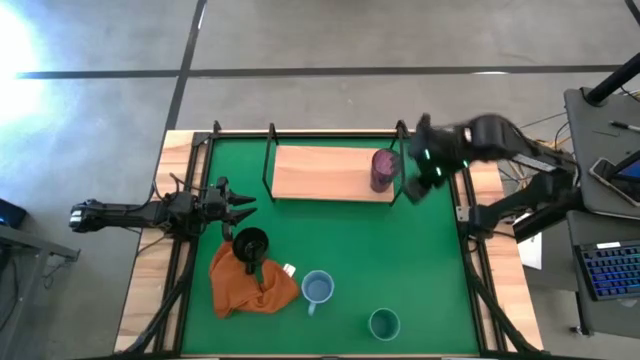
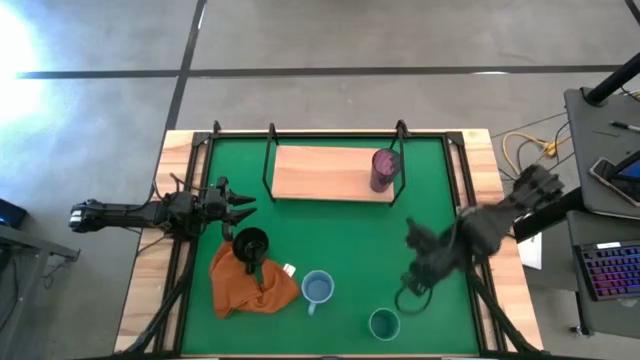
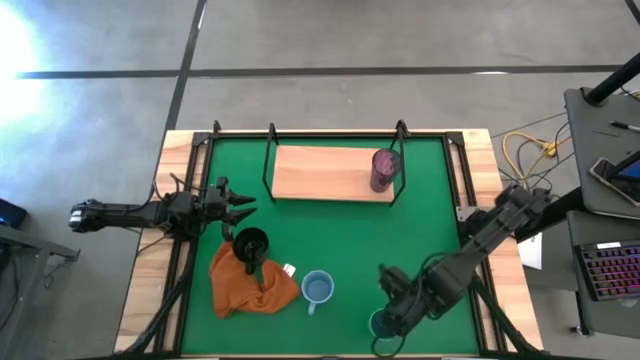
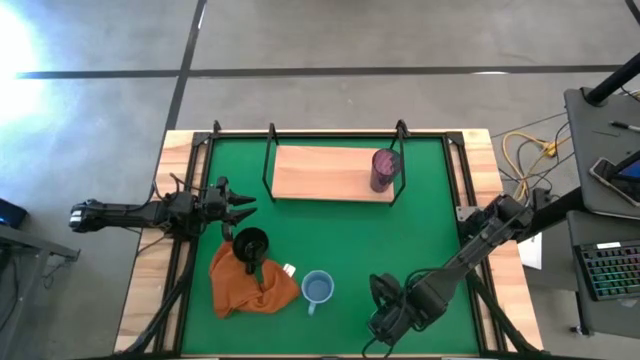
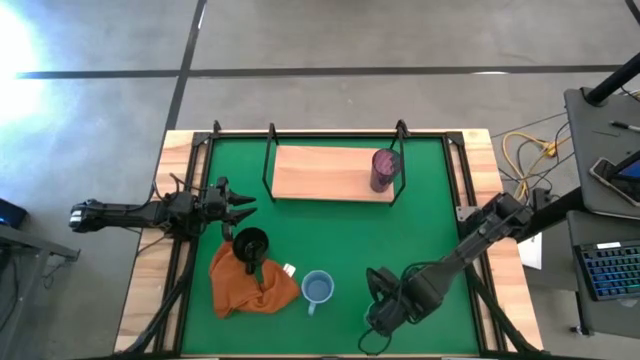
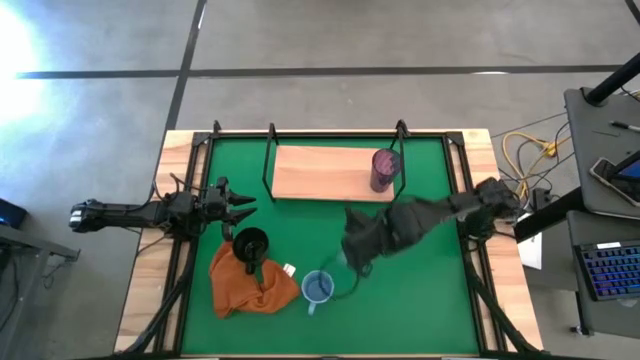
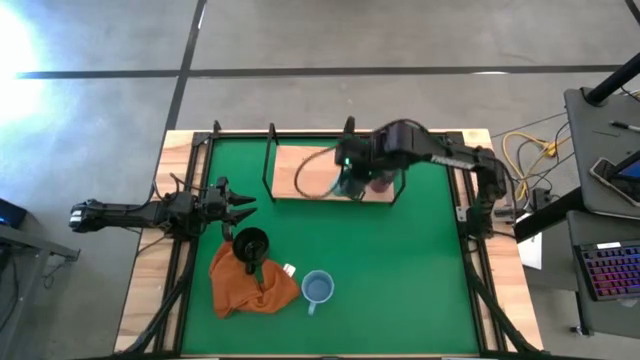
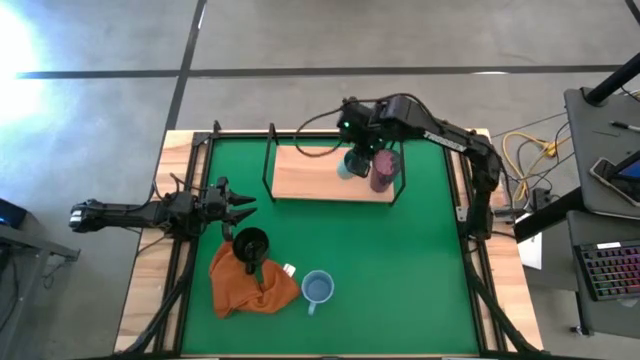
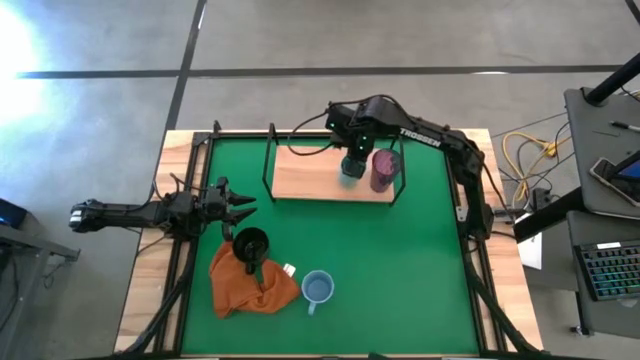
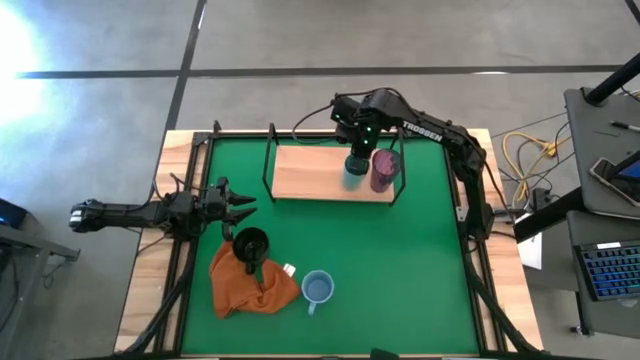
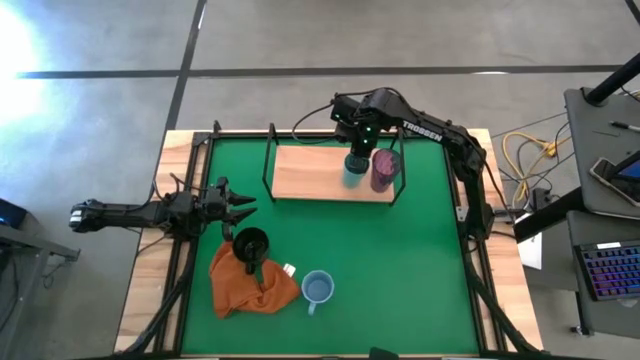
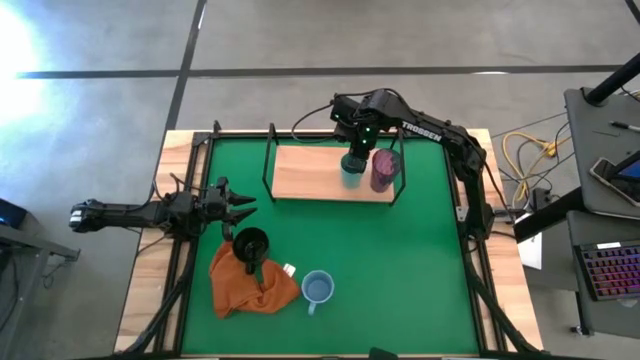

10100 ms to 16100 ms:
Task: Stack small to large cups/mugs on shelf
Put the green cup on the shelf

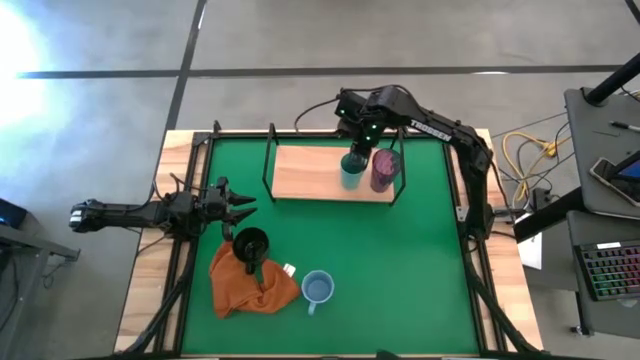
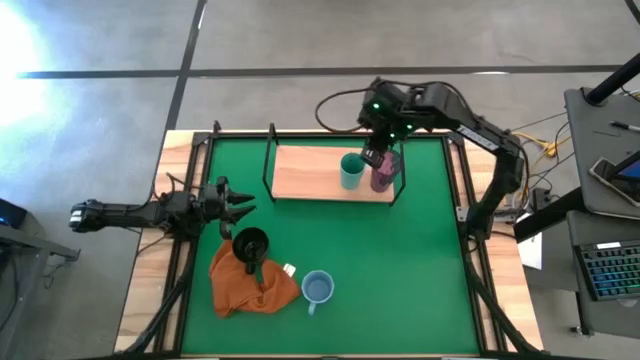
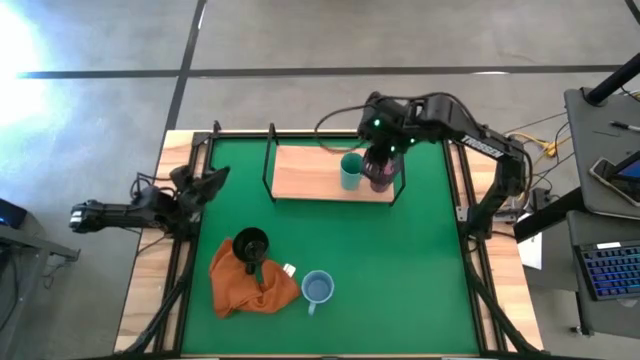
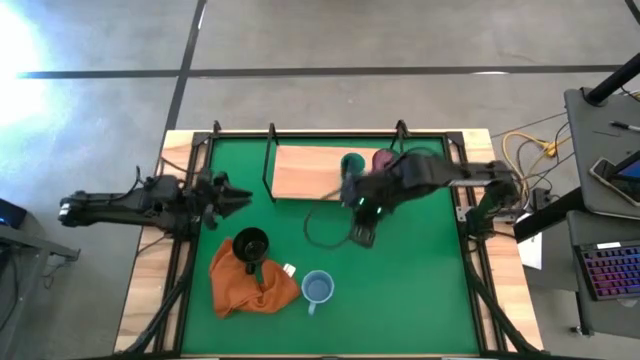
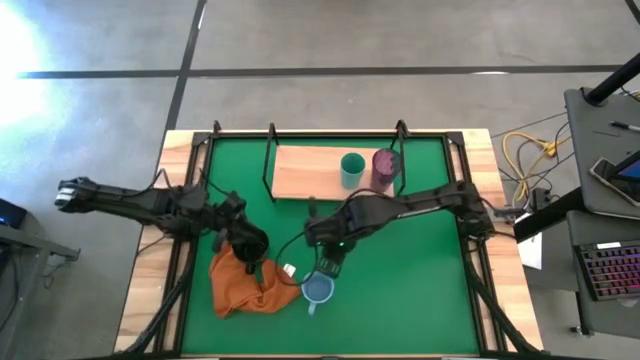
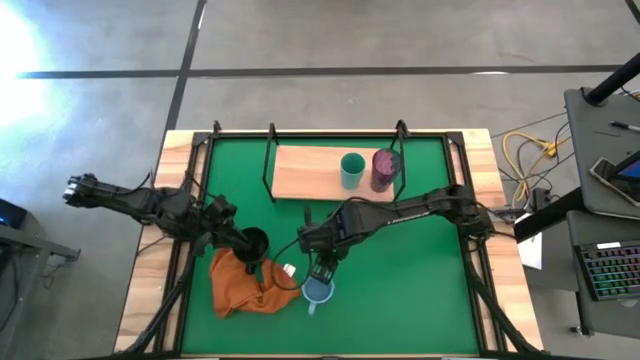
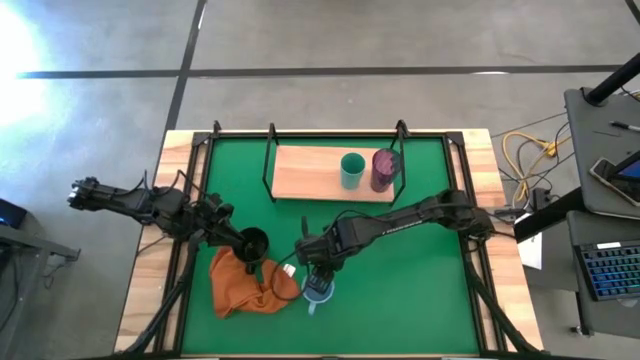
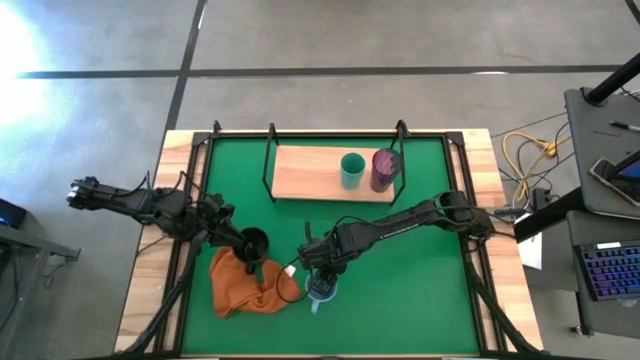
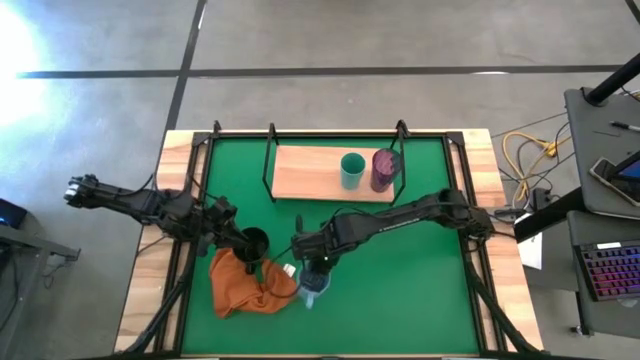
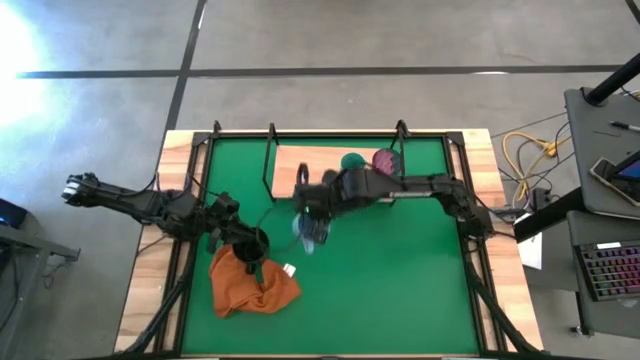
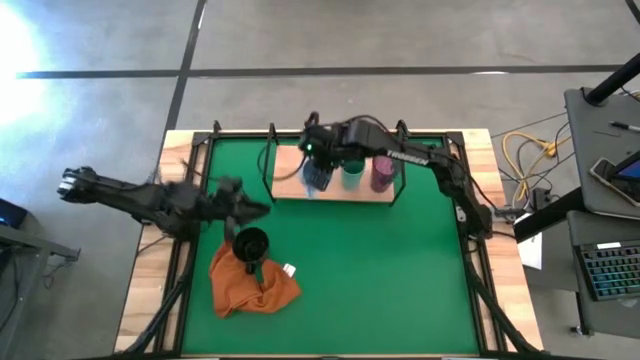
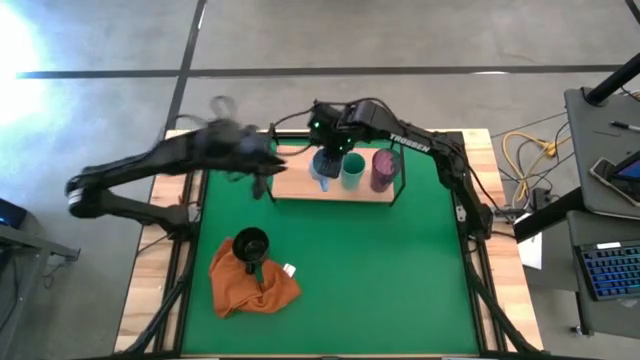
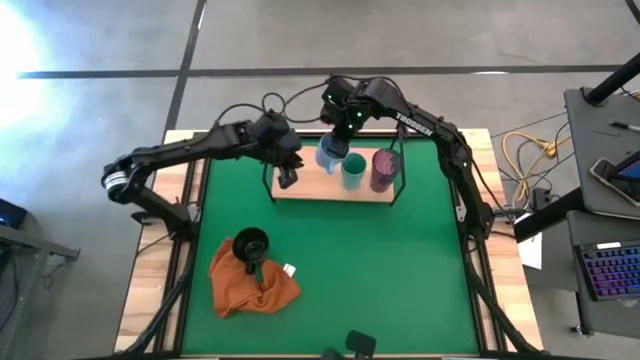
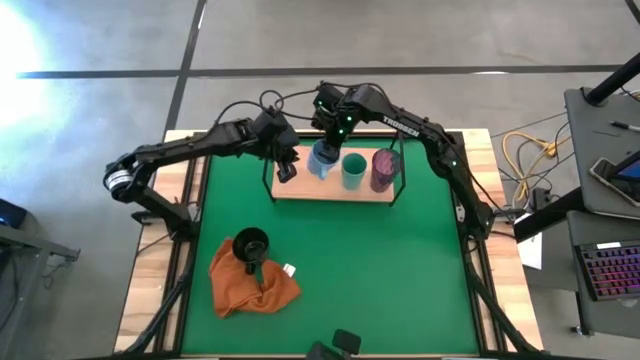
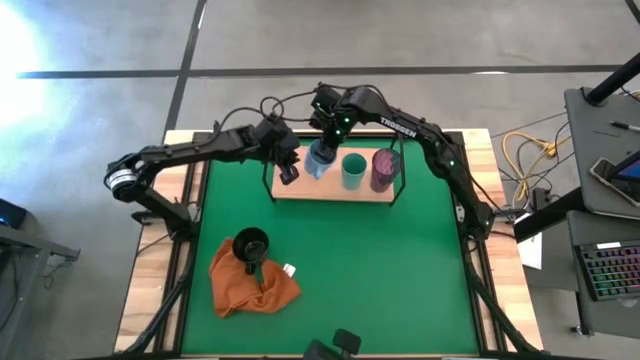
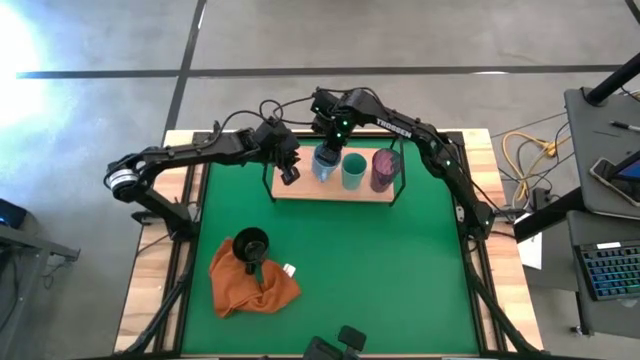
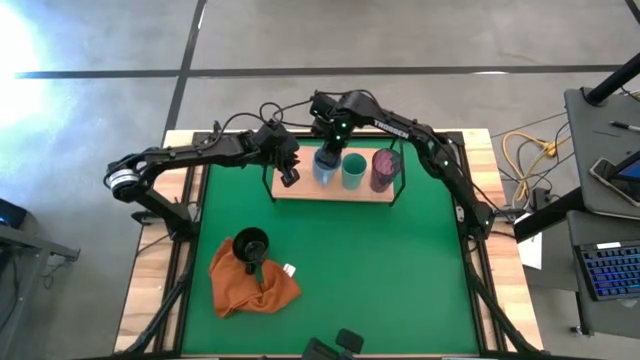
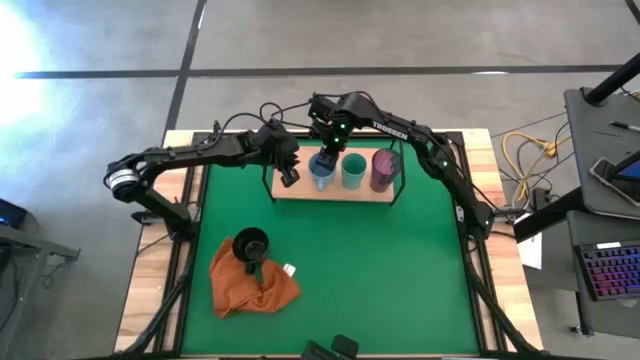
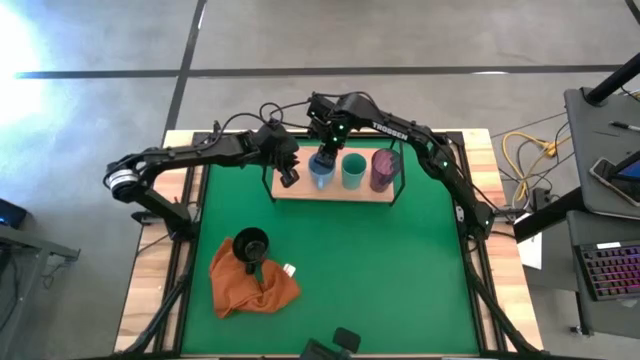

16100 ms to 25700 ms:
Put the blue mug on the shelf

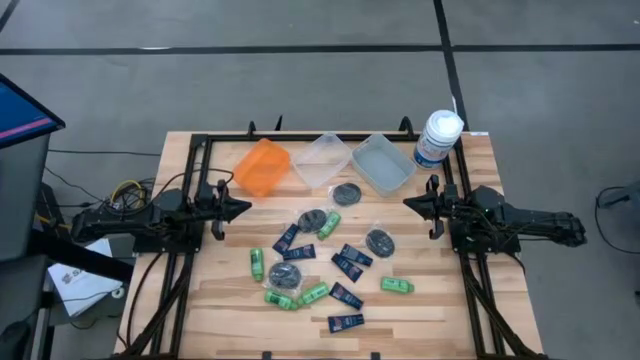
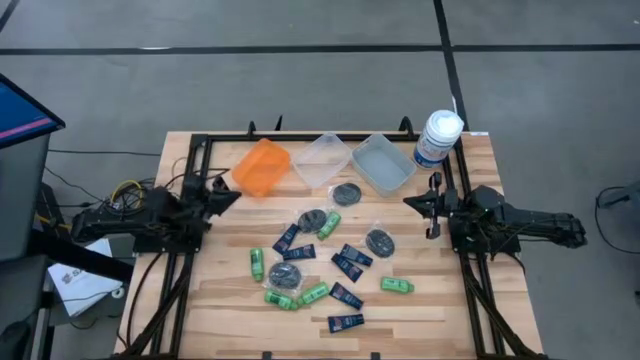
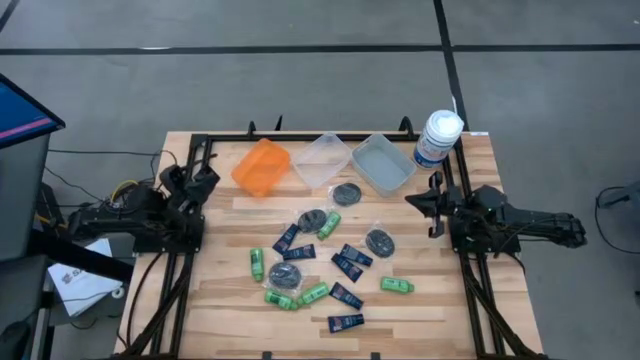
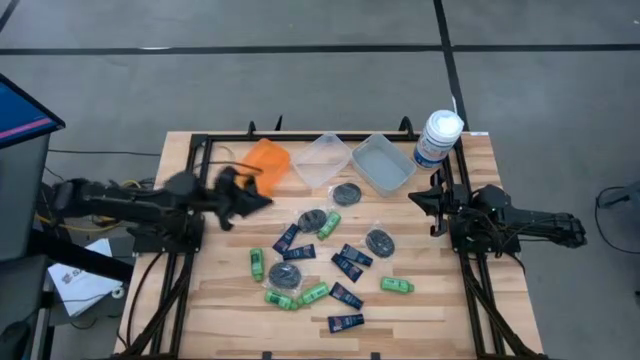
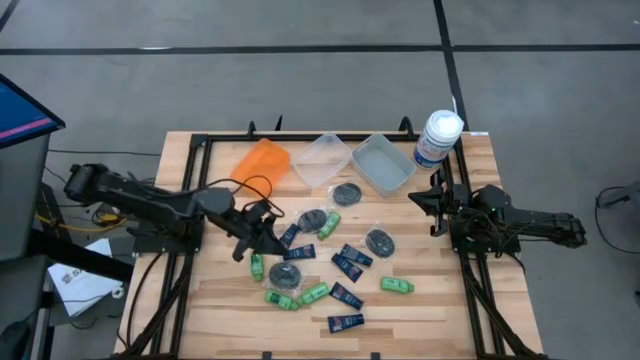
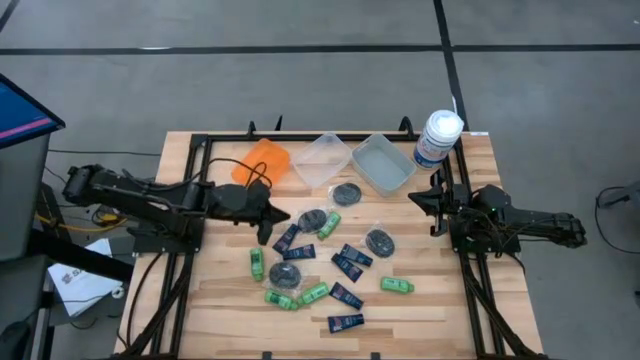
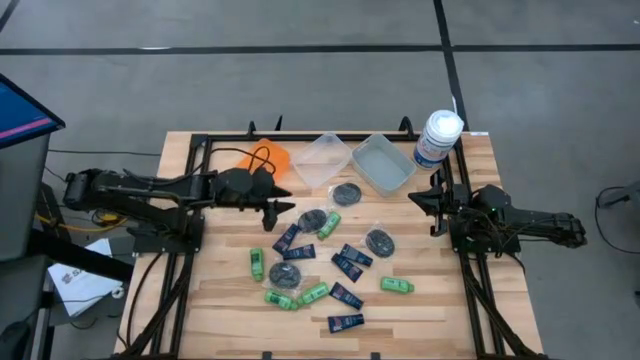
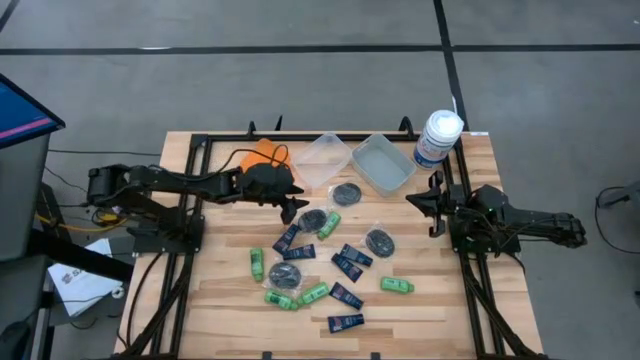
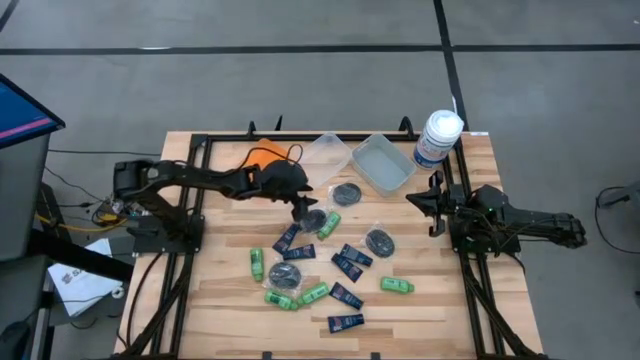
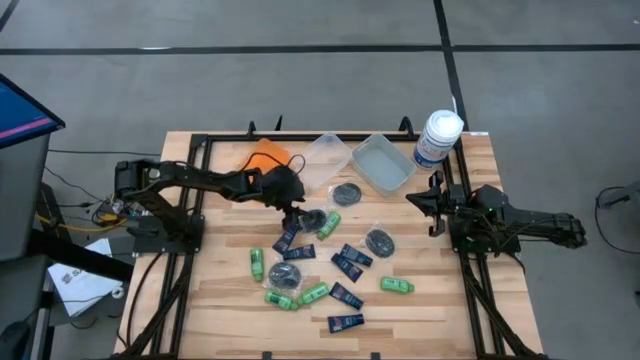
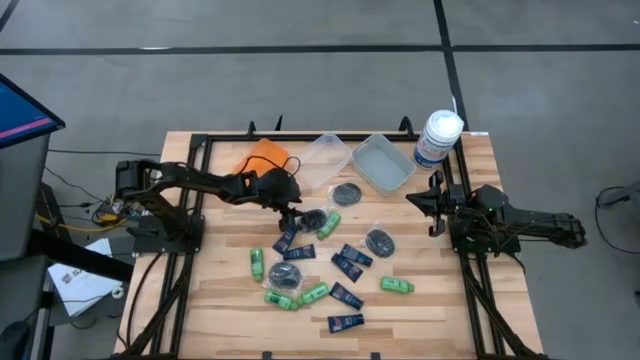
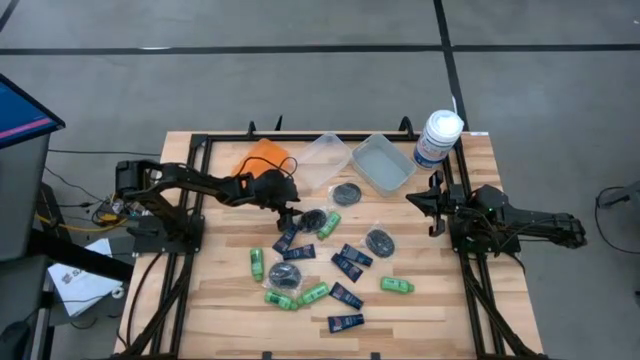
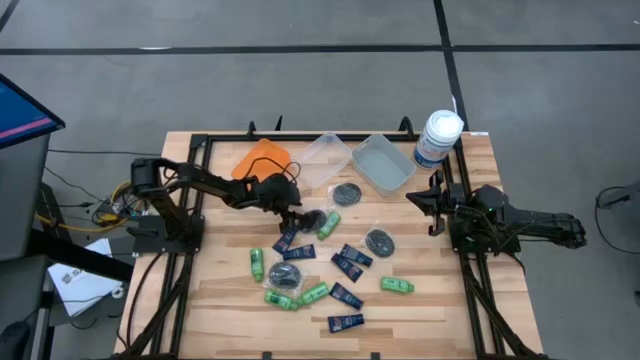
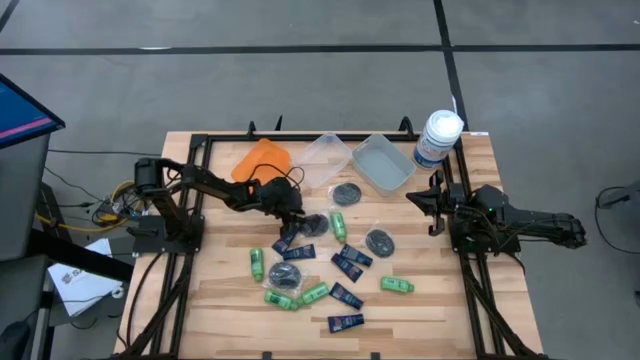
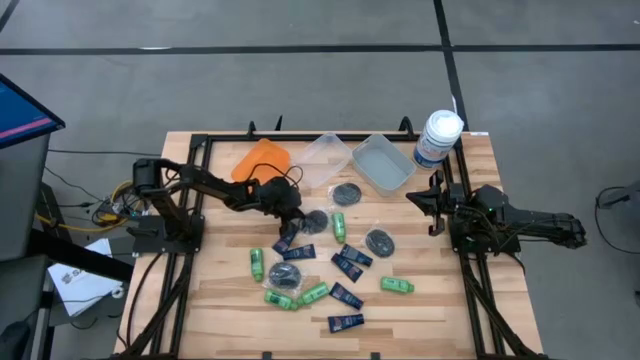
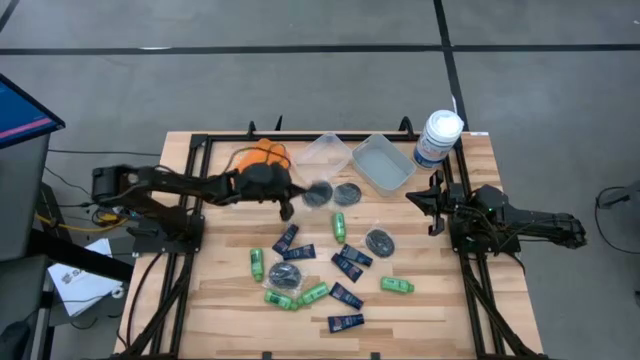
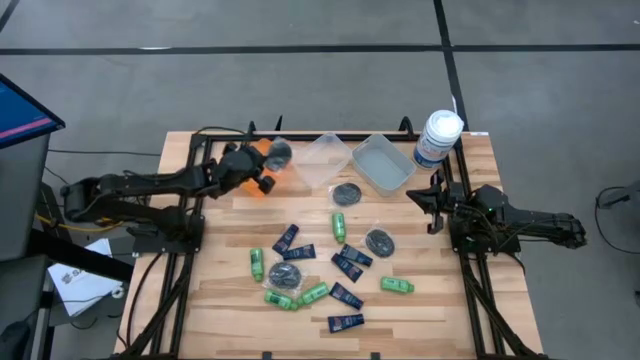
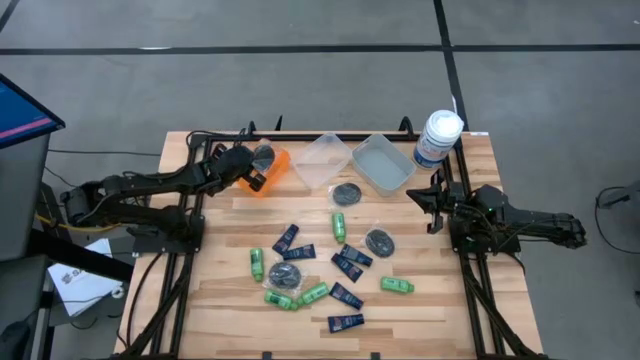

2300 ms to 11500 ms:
Task: Pick & Place Travel size toiletries
Put the hairbrush into the orange bin
